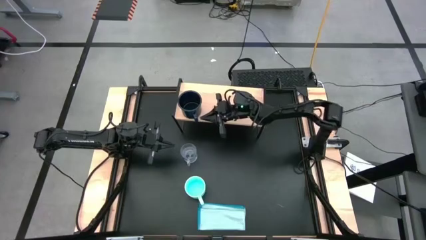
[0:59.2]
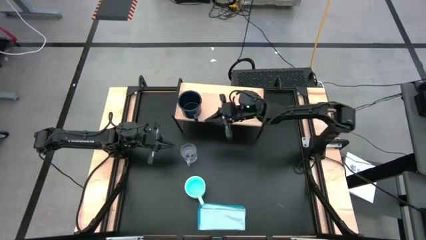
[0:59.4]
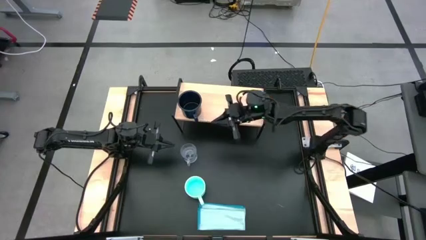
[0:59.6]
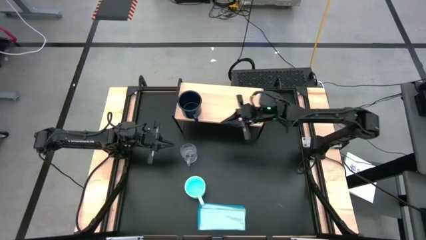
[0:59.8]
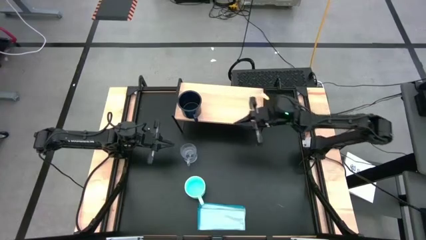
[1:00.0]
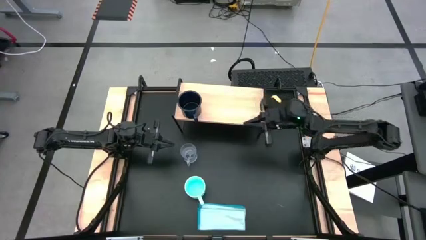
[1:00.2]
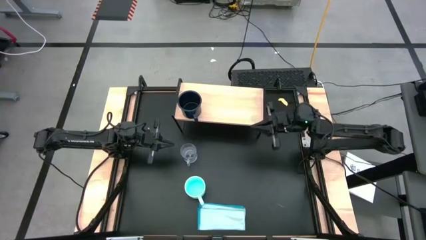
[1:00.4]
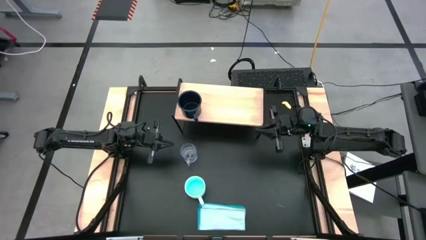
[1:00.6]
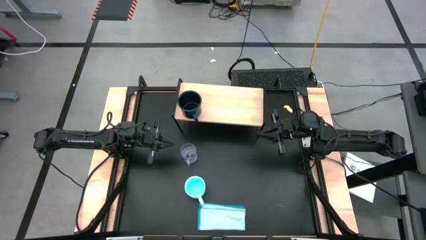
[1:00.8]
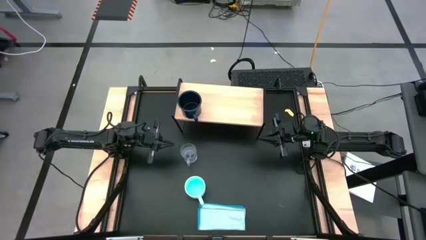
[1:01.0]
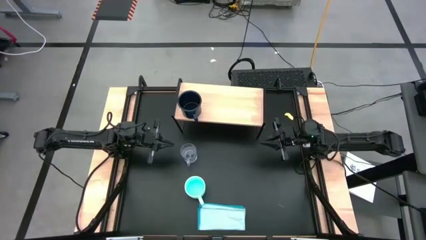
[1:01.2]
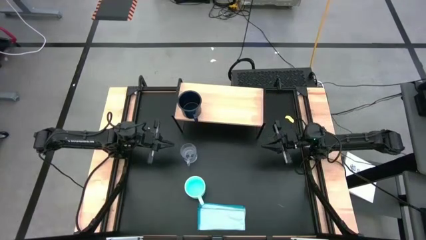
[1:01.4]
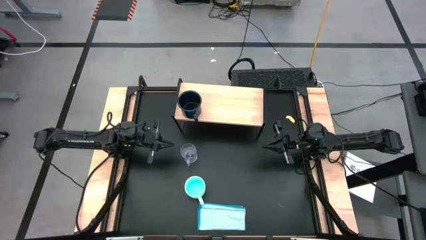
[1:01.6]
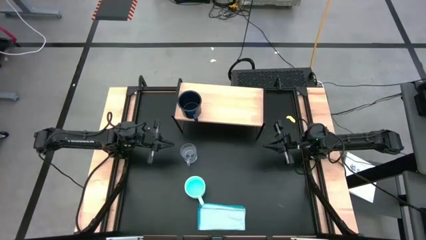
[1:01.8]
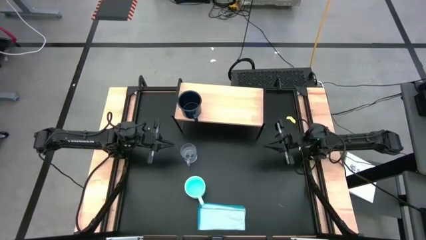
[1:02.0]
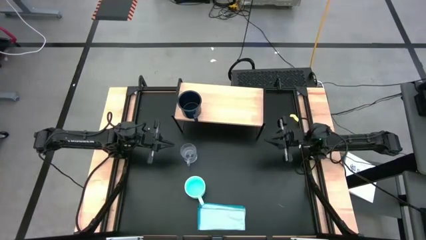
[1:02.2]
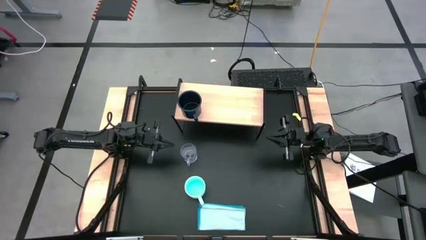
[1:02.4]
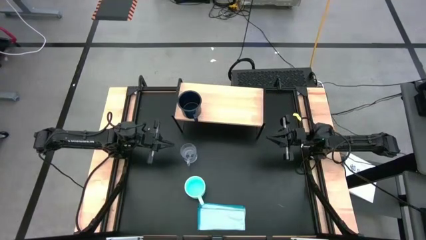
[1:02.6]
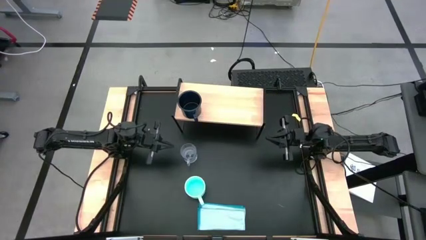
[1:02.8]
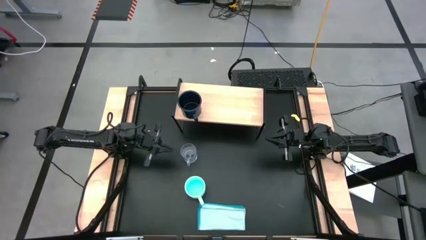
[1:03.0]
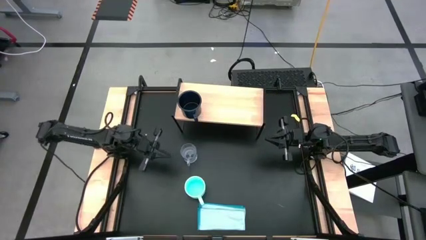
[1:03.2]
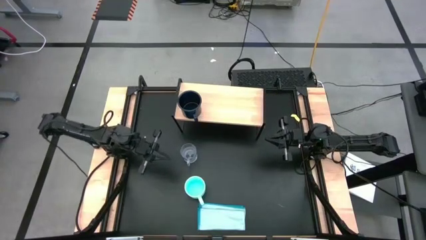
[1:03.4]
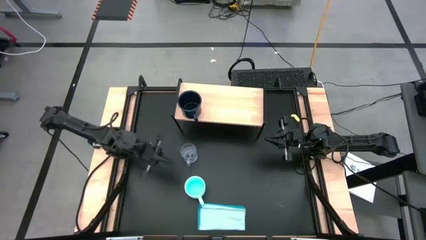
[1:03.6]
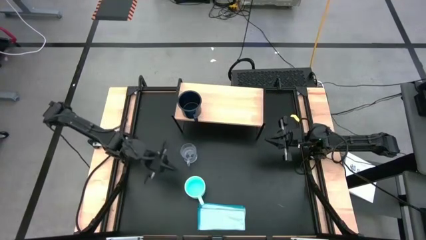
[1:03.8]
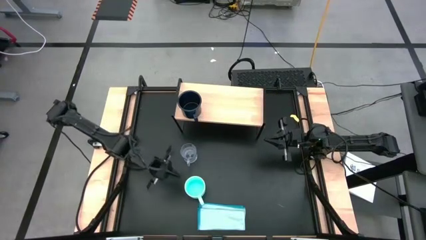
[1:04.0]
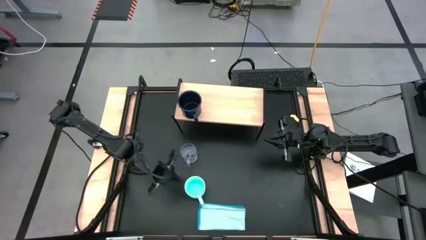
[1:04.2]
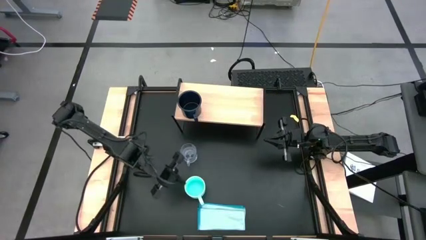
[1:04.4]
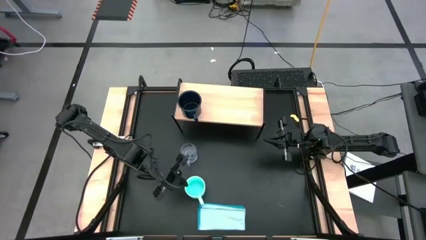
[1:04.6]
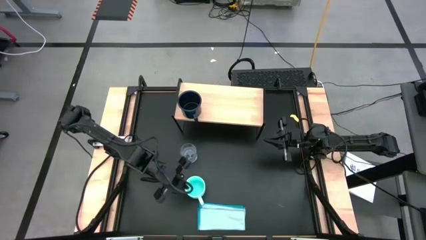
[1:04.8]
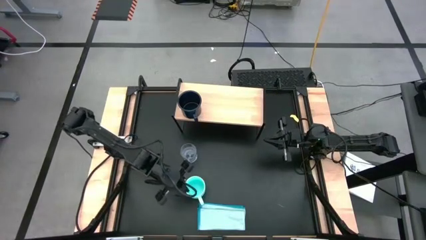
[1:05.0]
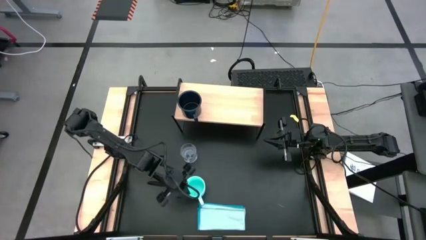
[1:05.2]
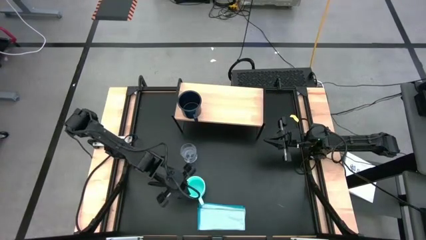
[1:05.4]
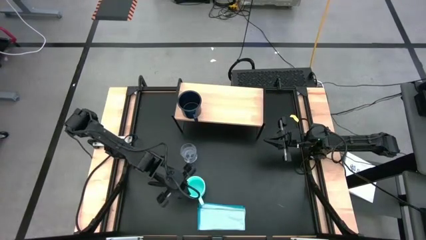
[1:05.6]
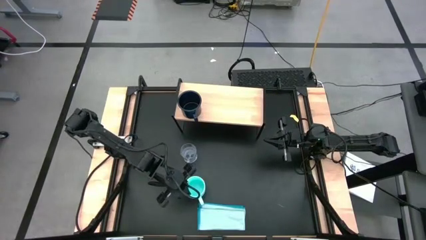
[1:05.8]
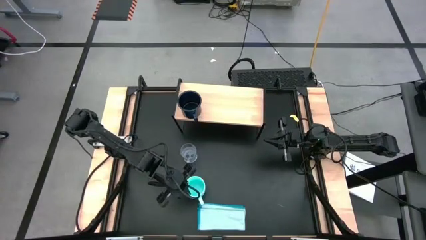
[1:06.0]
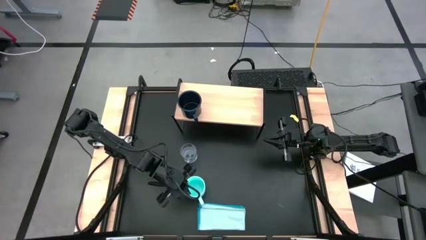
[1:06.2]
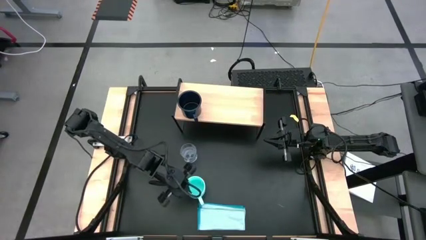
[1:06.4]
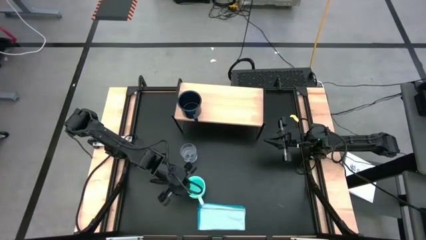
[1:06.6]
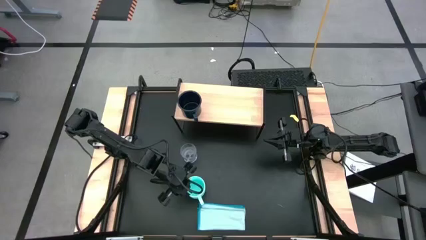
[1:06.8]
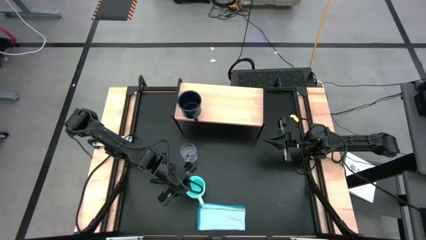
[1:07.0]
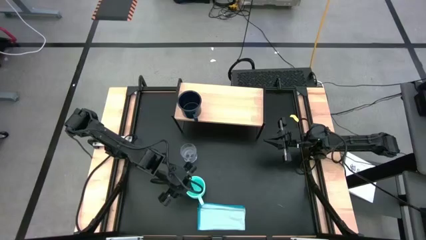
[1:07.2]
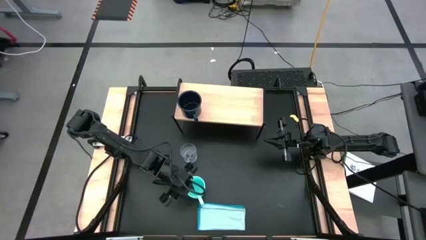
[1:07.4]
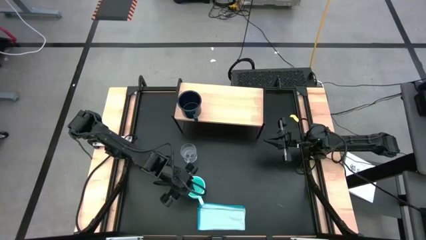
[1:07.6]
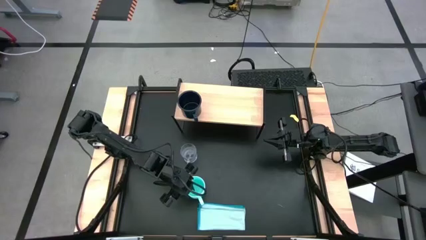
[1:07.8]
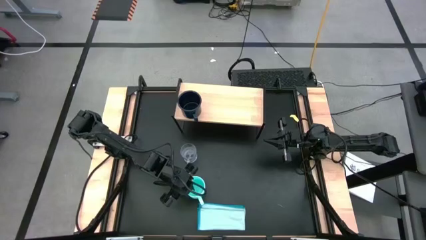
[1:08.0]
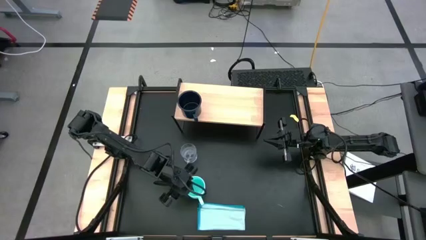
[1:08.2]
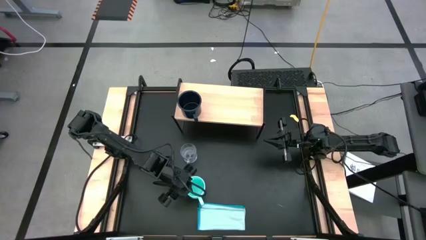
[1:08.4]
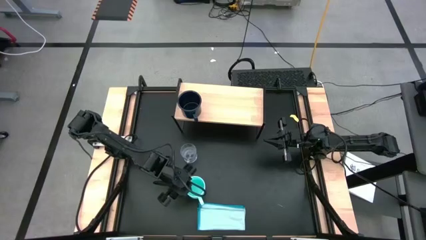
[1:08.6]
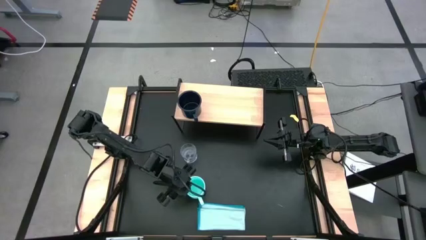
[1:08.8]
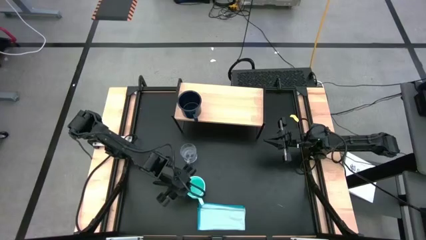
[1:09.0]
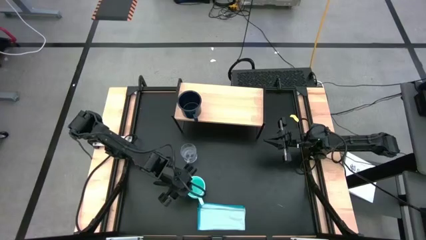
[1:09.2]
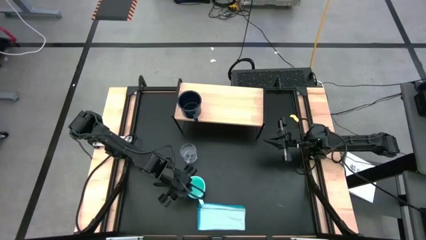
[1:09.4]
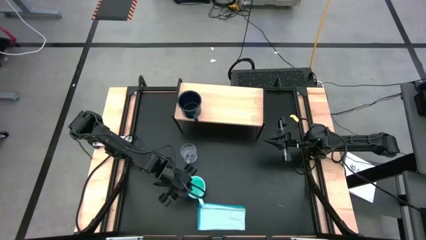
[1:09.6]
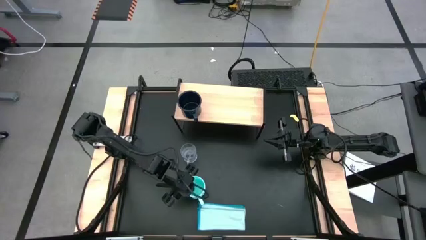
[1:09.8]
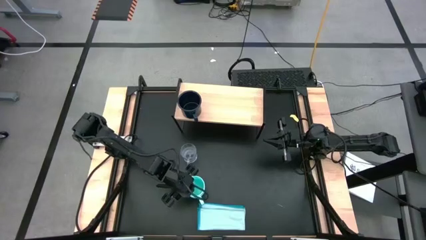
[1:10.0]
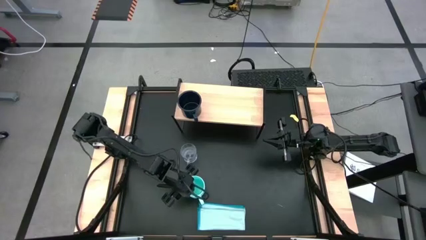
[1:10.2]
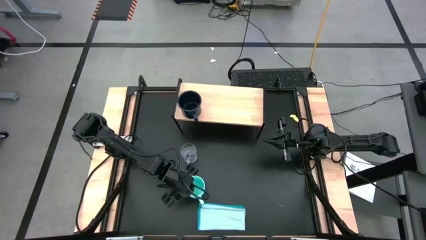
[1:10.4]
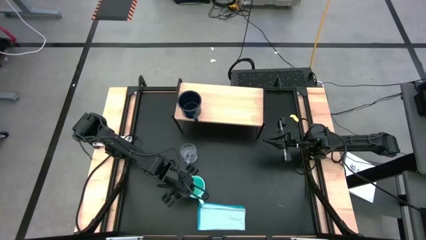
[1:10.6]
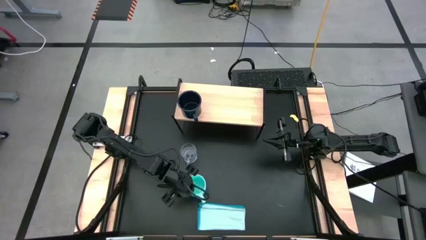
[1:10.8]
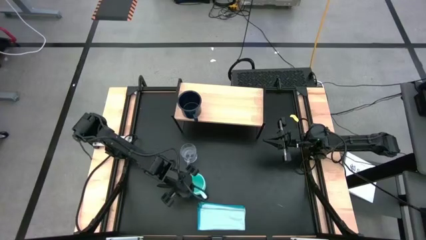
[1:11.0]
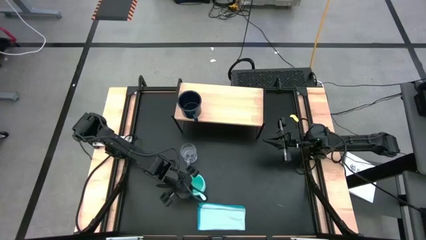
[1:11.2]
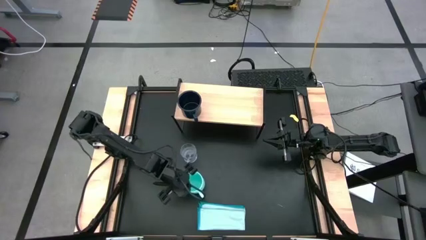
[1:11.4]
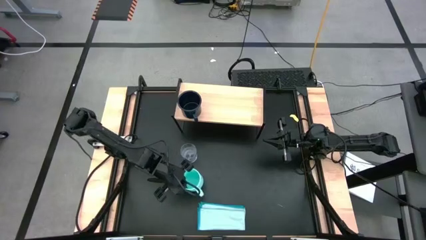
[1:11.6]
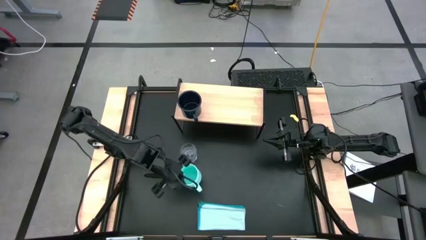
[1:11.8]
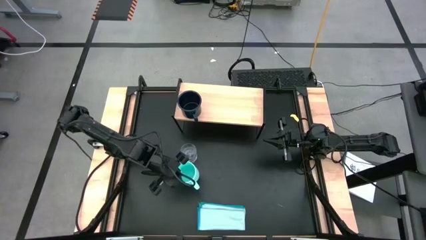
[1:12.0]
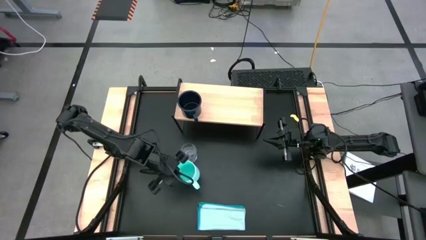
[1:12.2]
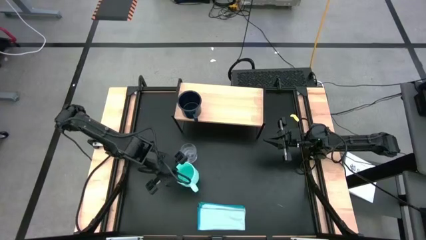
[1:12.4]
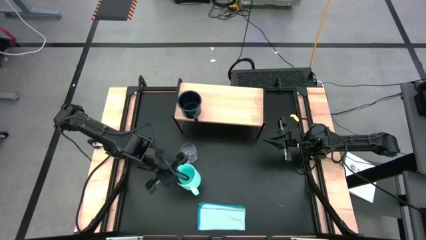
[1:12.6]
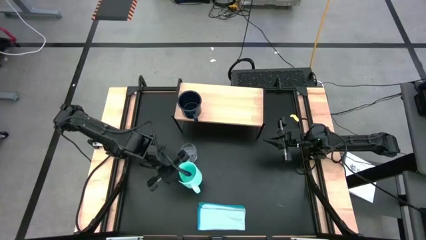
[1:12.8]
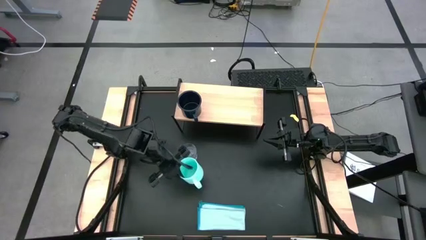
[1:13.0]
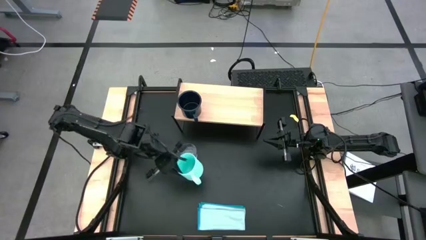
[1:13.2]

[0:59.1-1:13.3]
Task: Stack small to large cups/mugs on shelf
Put the blue mug on the shelf
